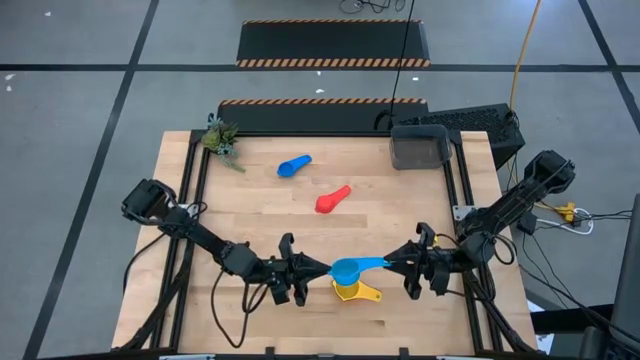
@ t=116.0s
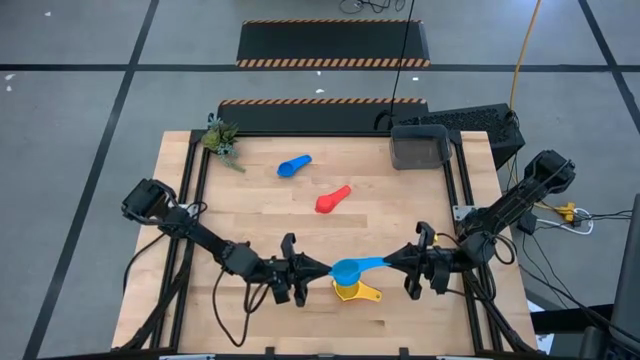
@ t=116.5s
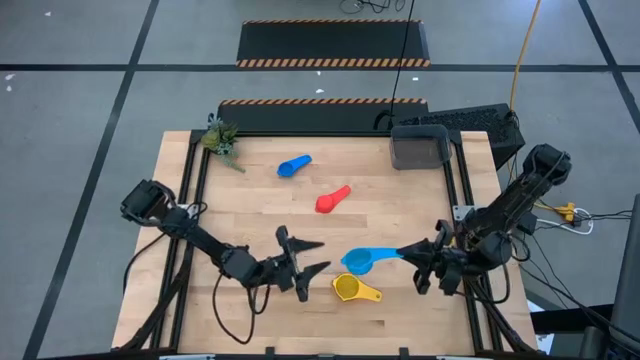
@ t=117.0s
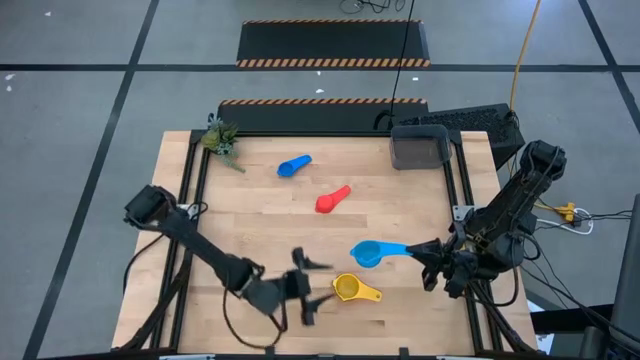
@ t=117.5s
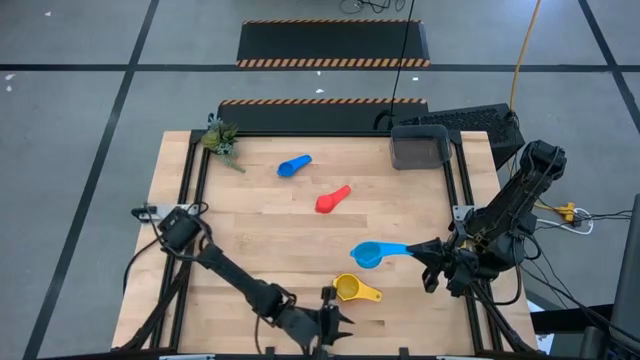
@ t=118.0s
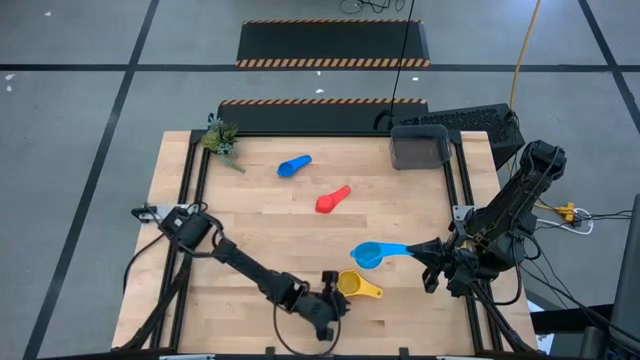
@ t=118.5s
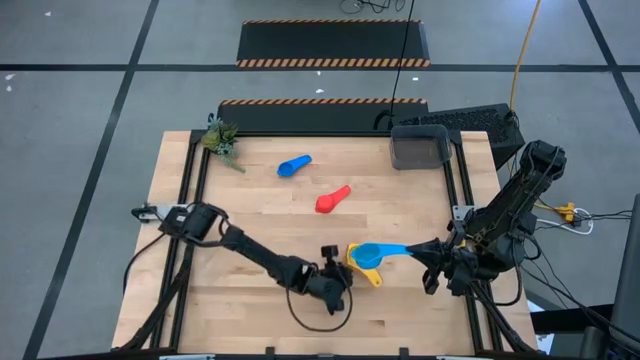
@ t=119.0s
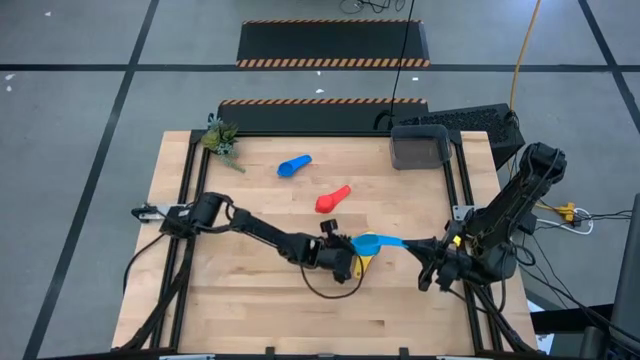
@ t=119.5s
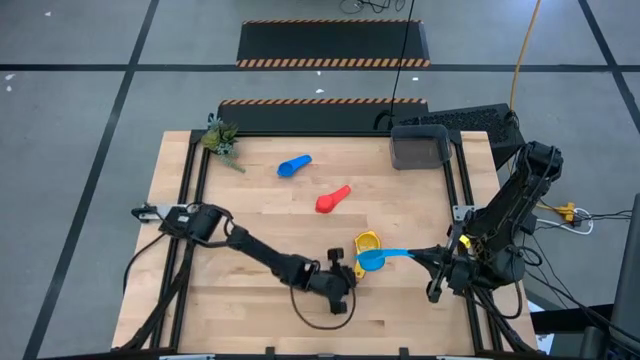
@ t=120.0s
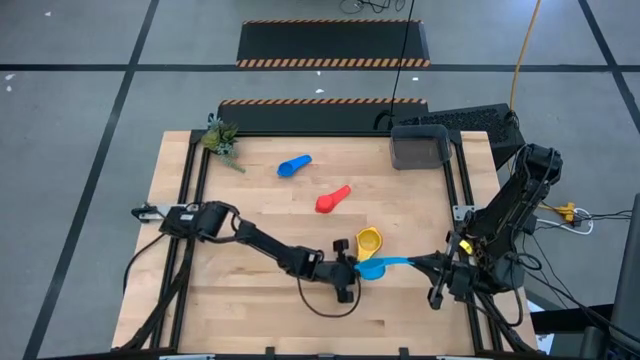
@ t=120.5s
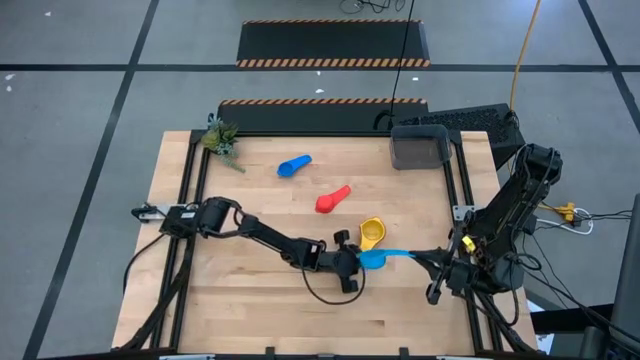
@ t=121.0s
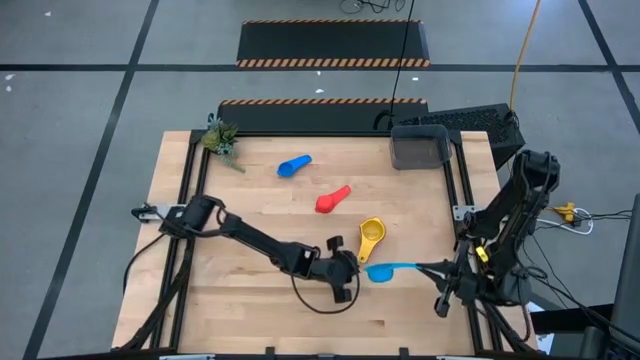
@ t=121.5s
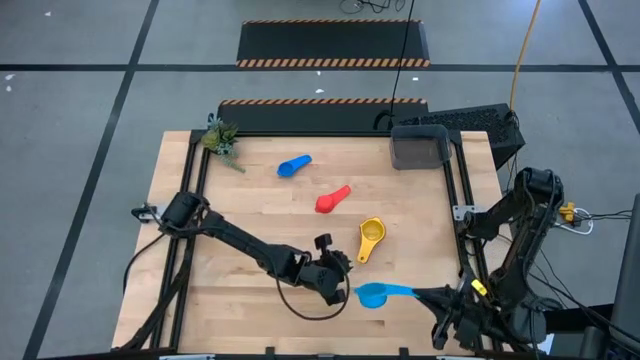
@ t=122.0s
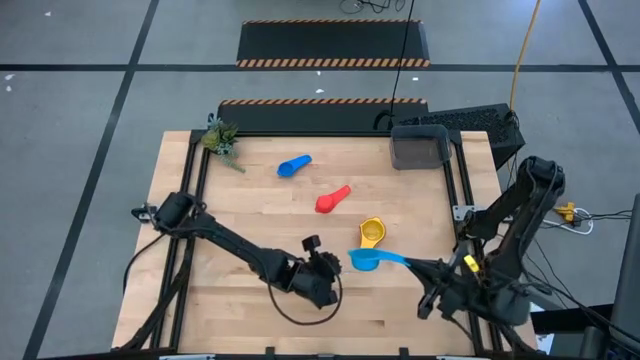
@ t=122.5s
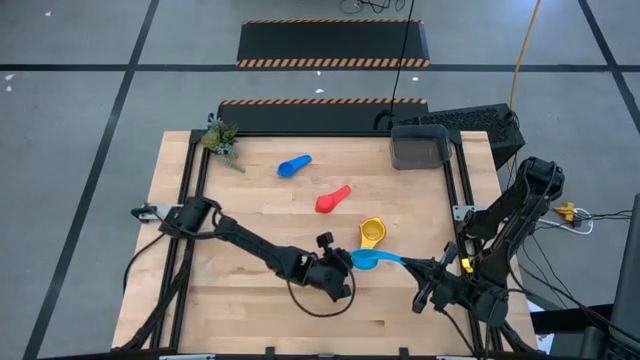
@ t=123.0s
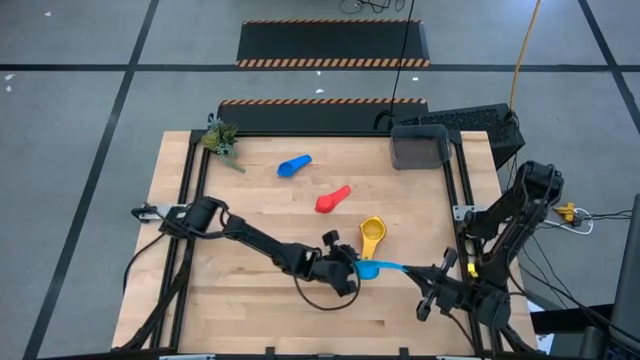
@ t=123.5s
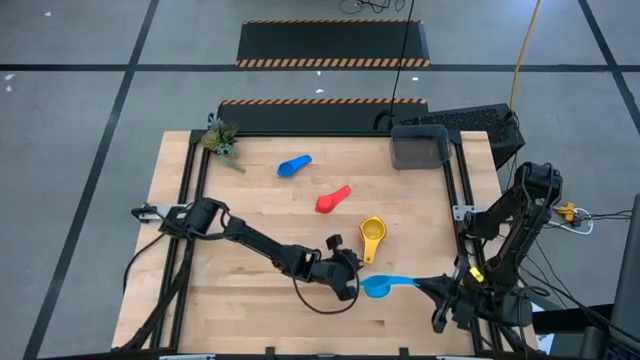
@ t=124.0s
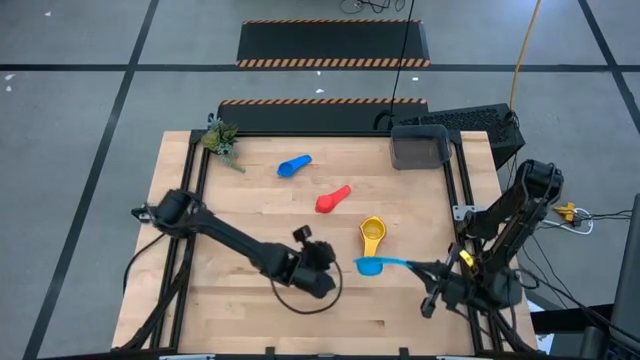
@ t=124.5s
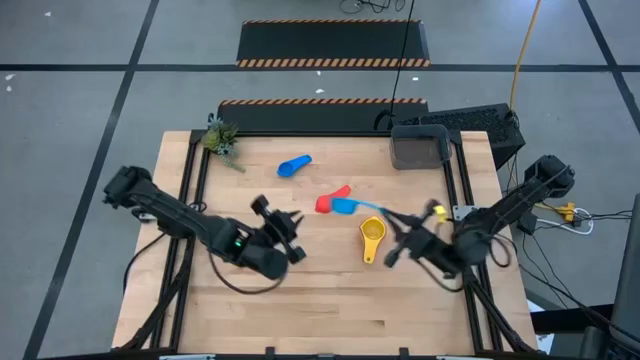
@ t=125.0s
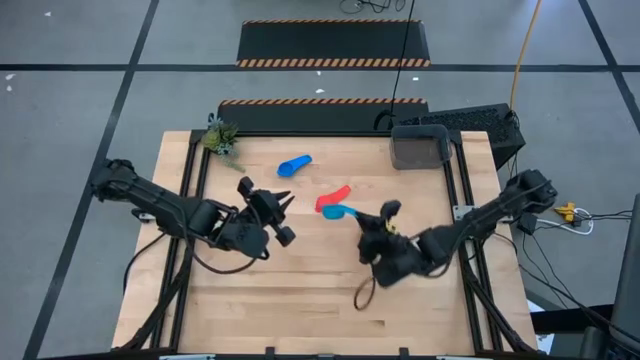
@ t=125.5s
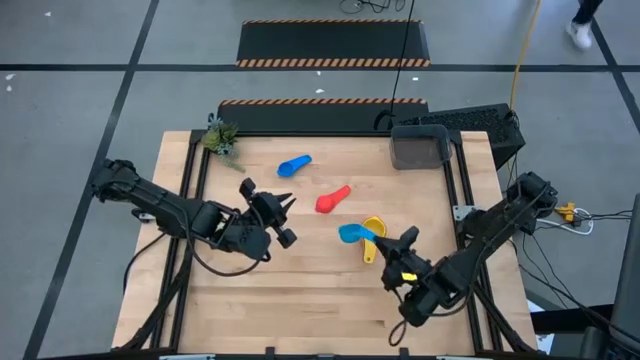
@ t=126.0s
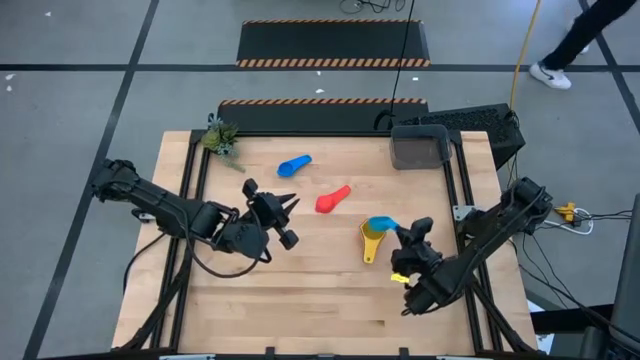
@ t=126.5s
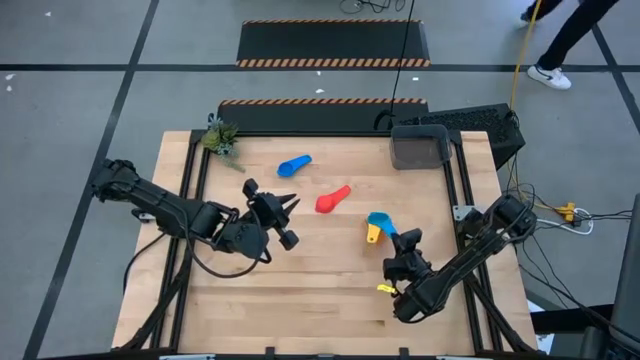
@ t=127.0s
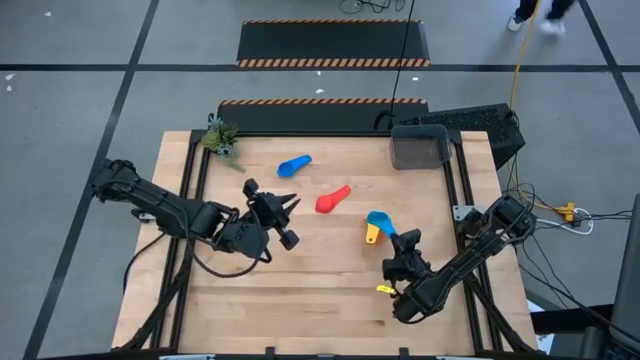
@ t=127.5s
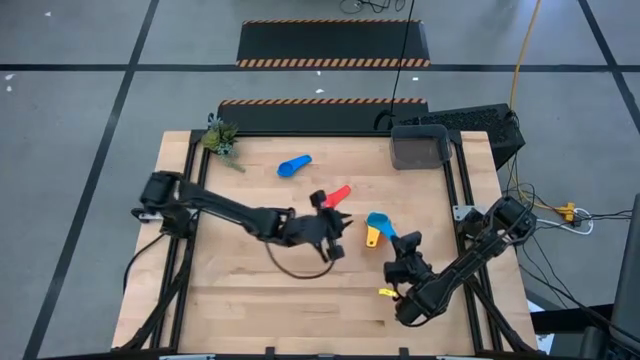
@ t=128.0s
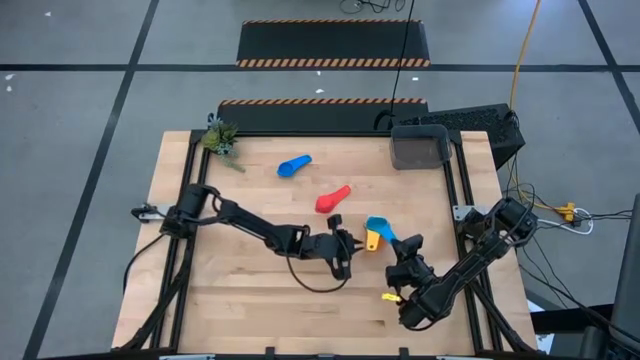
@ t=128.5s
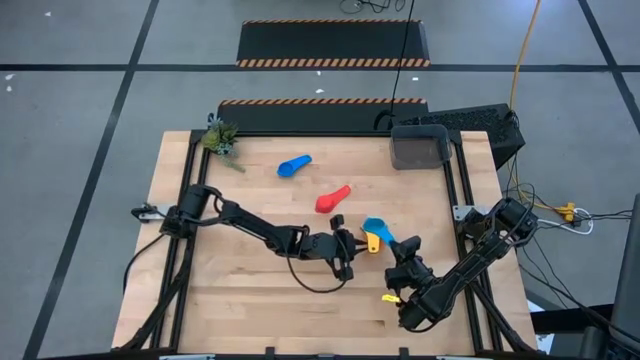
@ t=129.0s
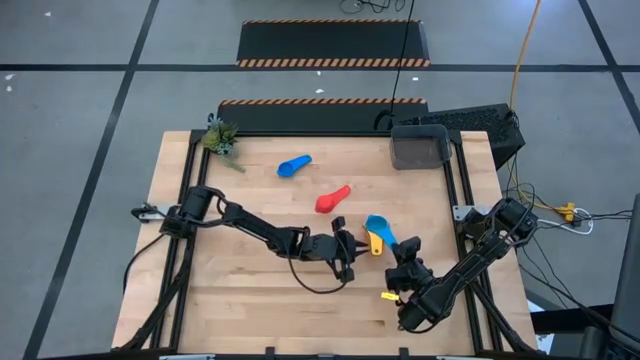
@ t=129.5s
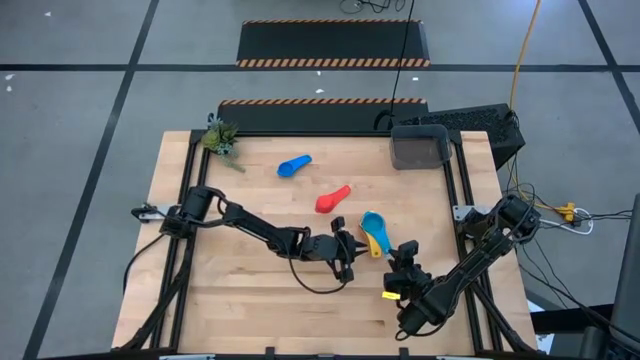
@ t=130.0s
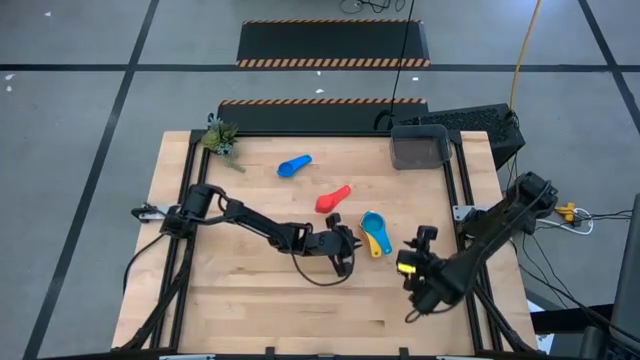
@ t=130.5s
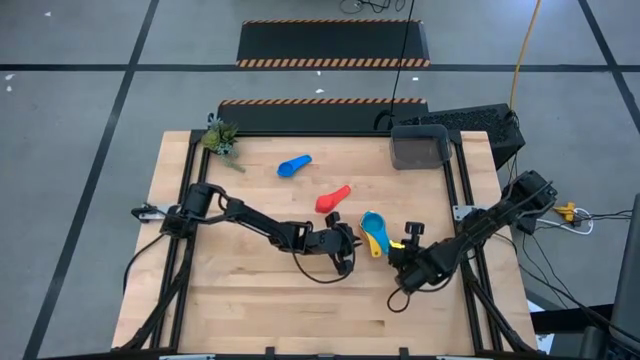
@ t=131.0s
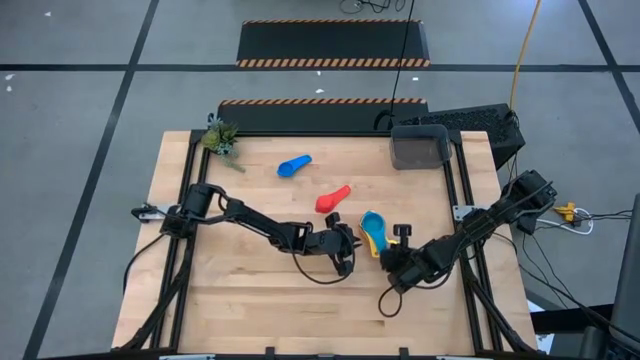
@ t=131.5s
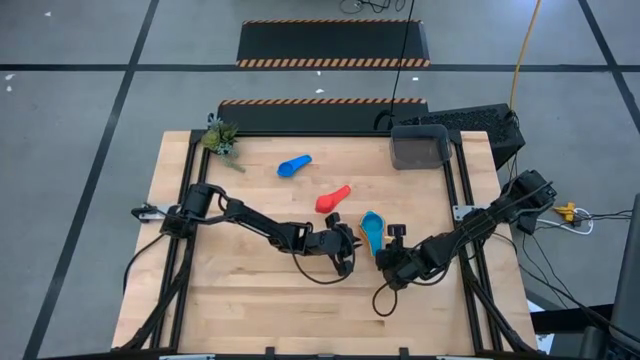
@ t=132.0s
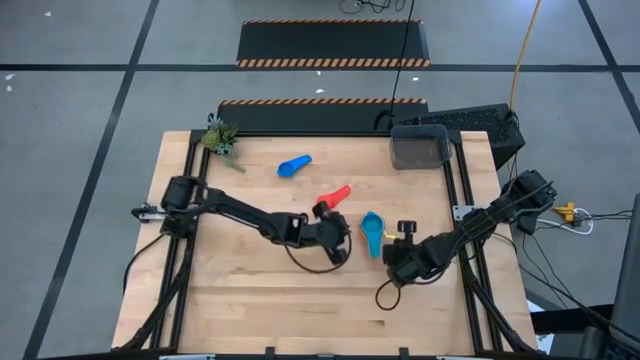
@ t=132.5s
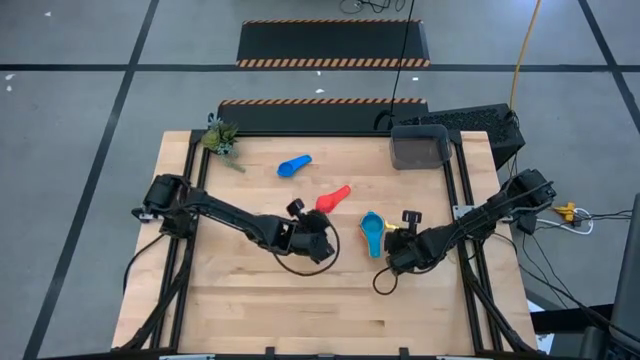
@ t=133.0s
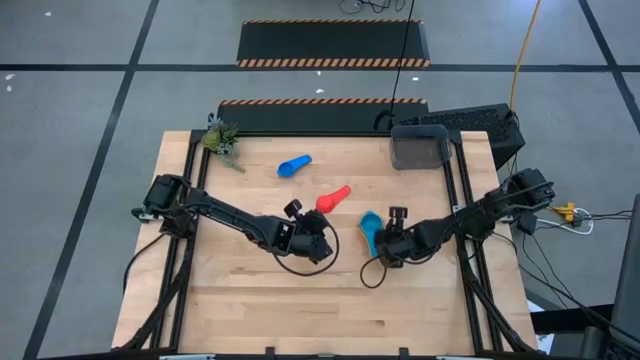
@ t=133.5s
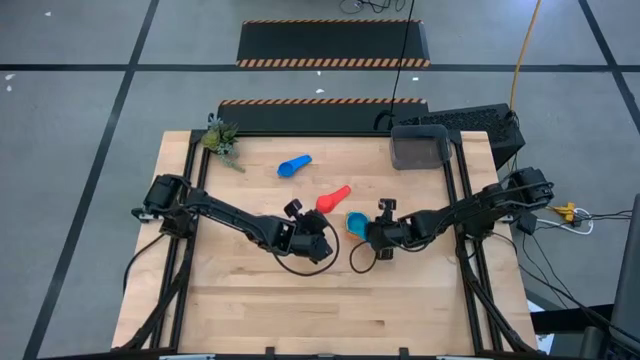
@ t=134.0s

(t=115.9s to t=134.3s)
Task: Nest measuring cups in basket
Stack the light blue measuring cup on top of the yellow measuring cup

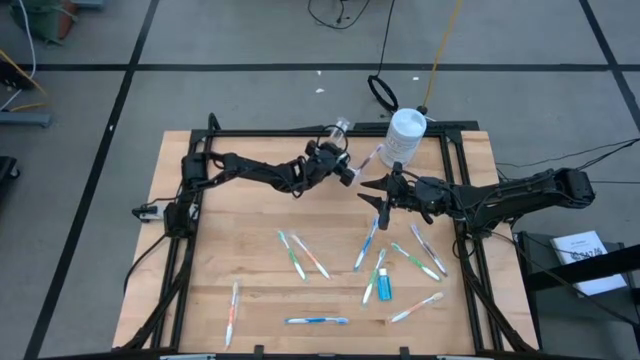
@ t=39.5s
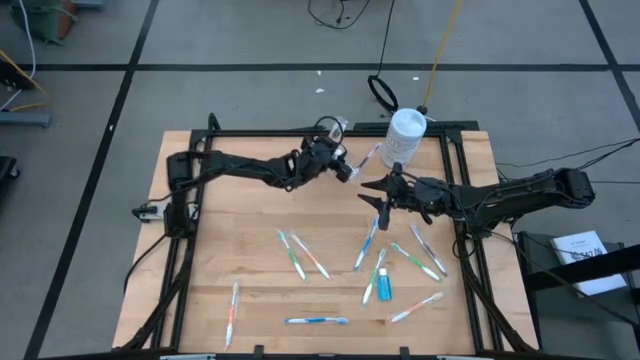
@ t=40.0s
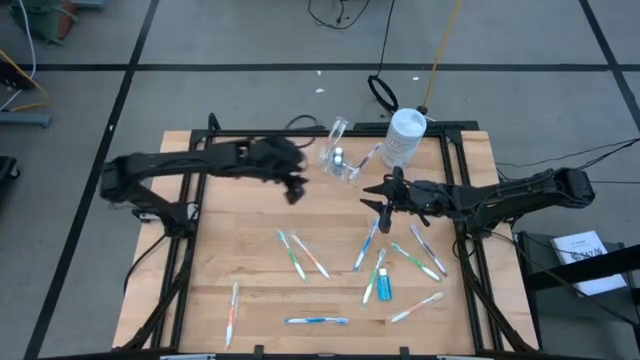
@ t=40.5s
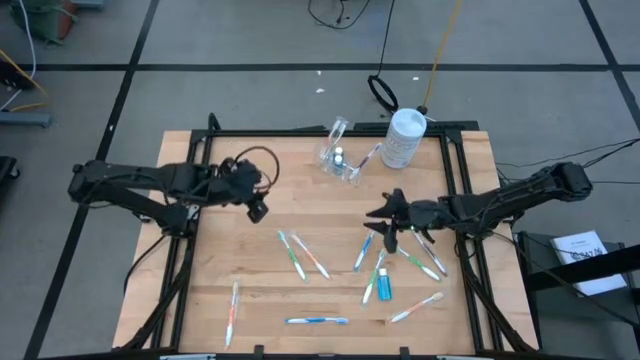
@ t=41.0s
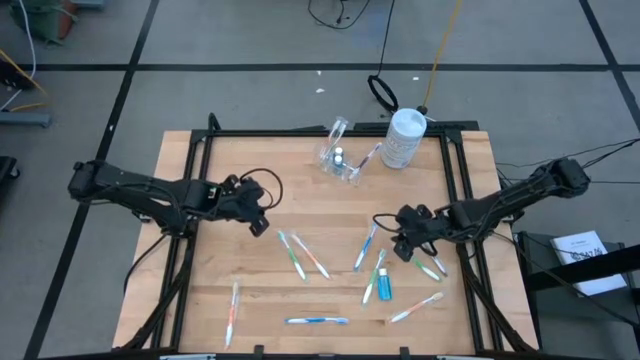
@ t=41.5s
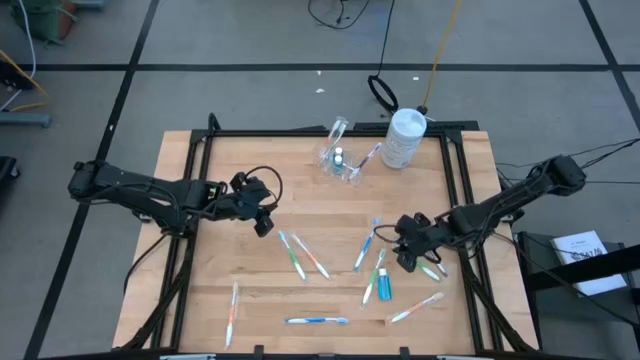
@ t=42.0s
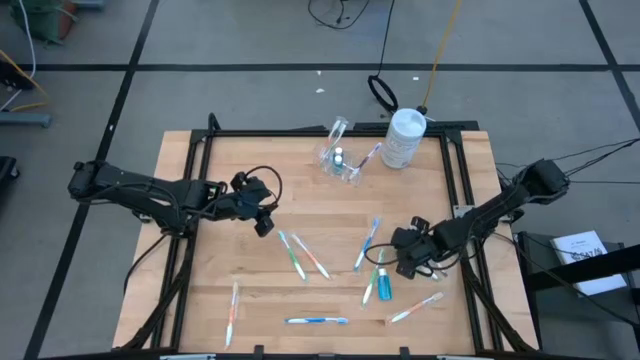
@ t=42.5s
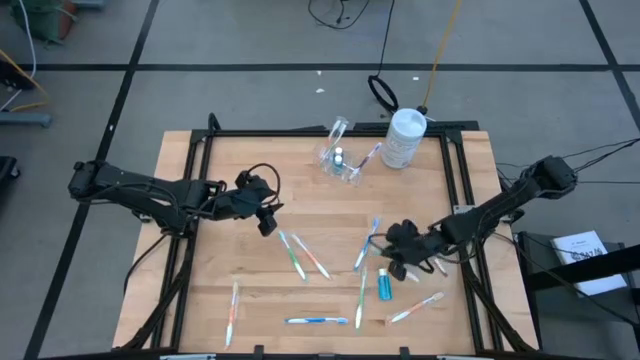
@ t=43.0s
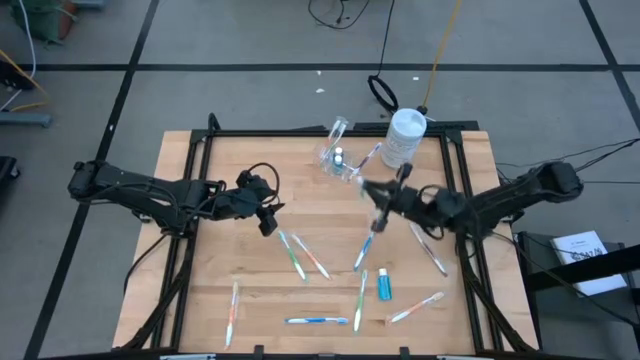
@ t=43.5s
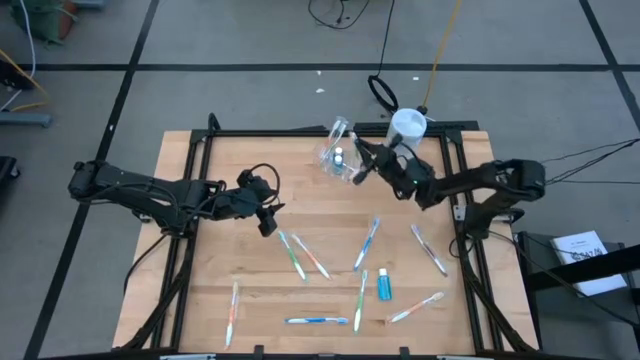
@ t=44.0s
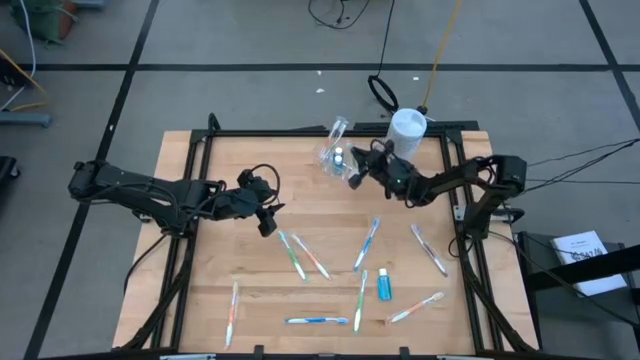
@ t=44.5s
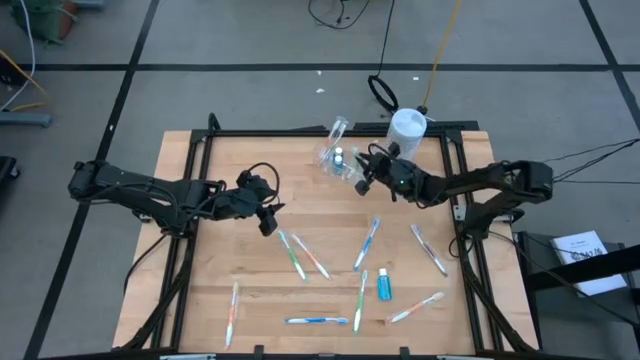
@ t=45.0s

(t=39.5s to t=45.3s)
Task: Pick & Place toothbrushing station
Put the green toothbrush into the transparent organizer
